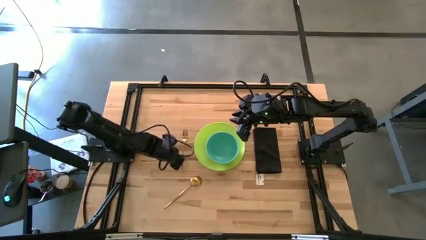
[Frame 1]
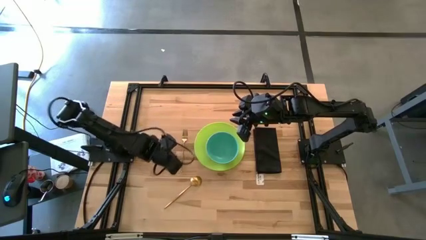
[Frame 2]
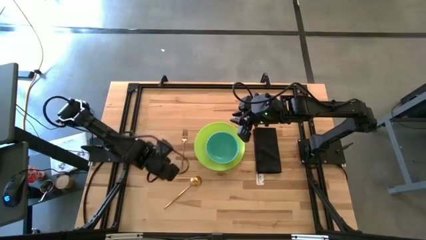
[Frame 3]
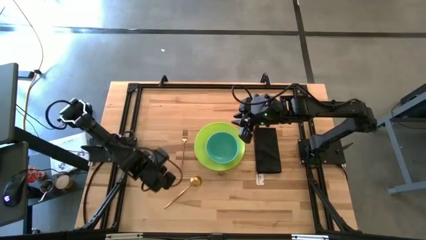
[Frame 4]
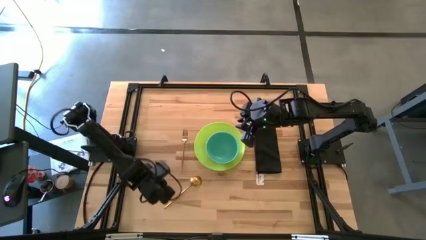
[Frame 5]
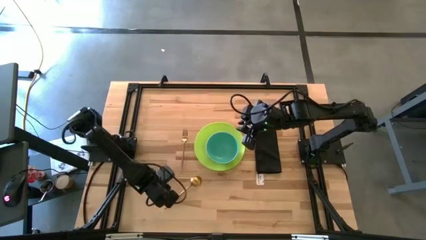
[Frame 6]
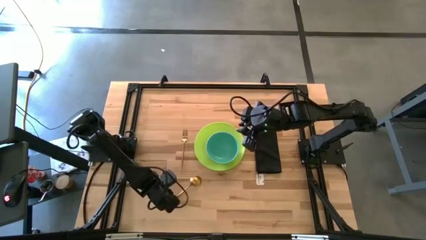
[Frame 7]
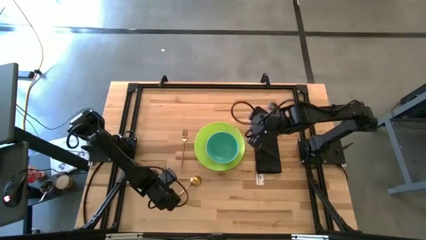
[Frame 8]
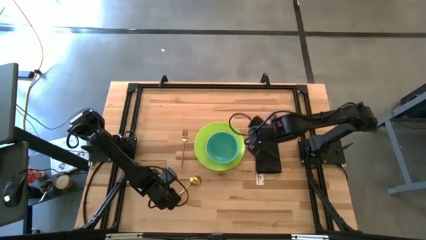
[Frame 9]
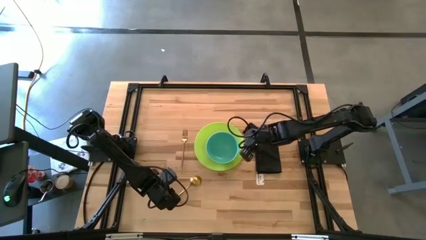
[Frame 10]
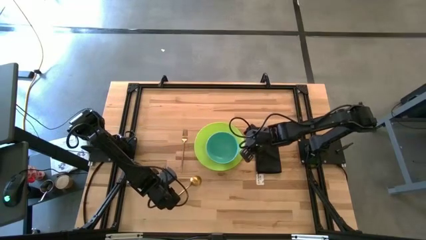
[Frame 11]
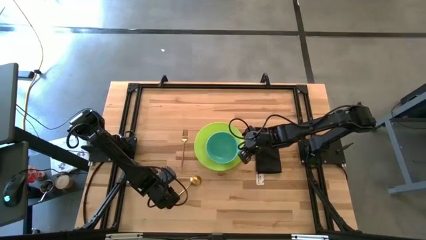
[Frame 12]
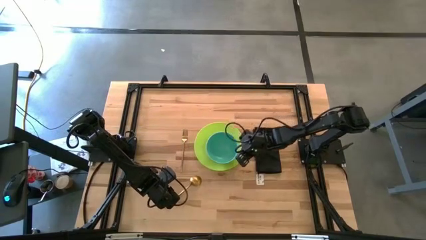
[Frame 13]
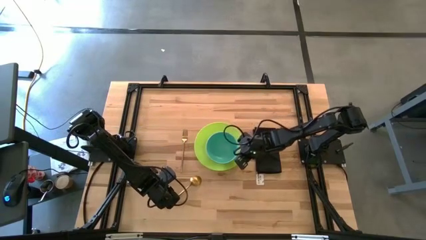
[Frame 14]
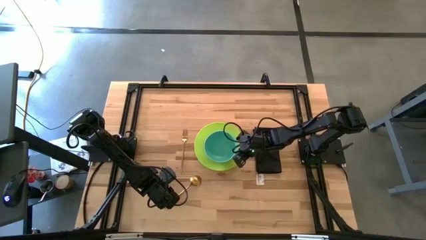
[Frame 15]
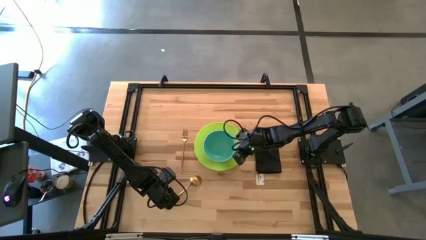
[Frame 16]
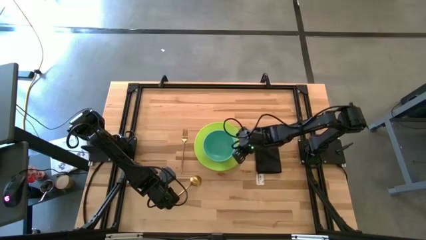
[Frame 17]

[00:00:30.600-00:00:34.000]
Task: Set table place
Adjust the blue bowl on the light green plate

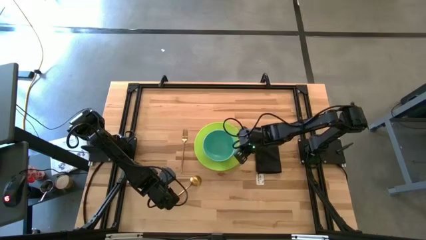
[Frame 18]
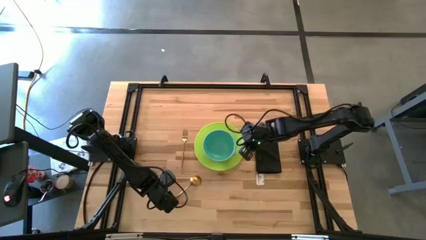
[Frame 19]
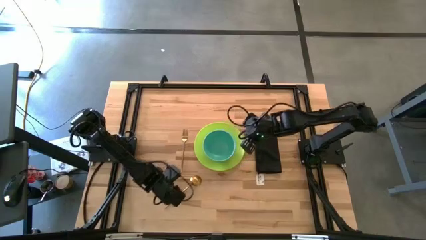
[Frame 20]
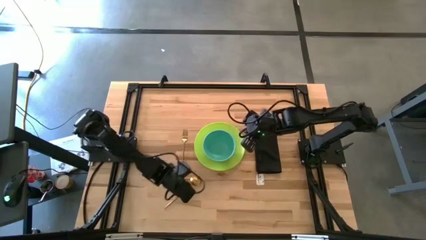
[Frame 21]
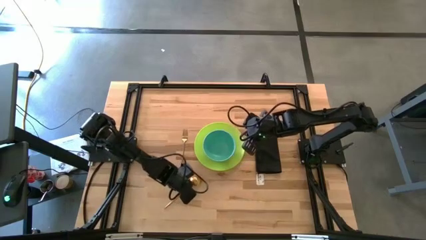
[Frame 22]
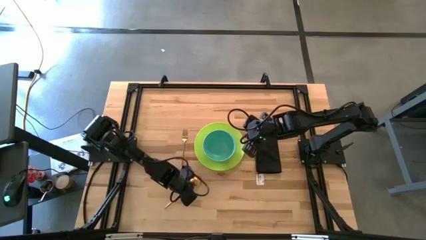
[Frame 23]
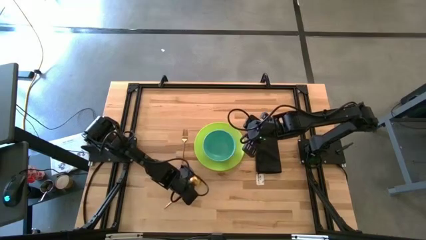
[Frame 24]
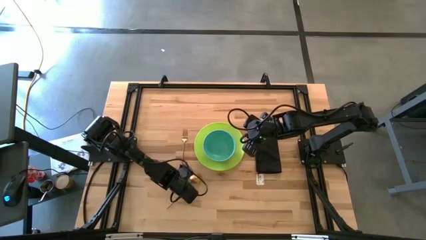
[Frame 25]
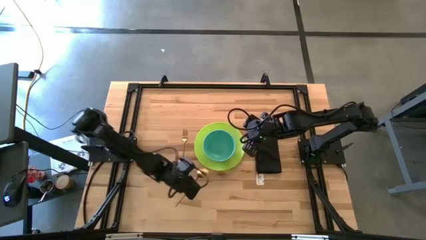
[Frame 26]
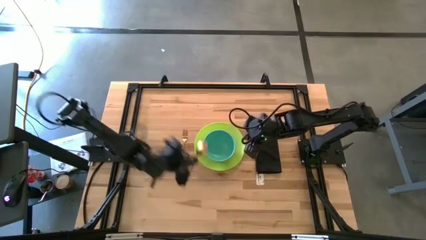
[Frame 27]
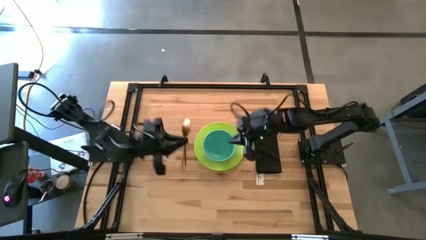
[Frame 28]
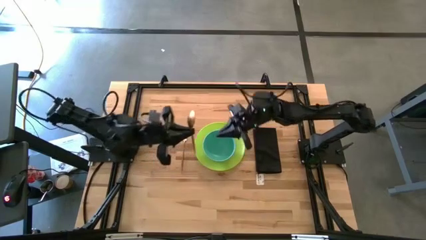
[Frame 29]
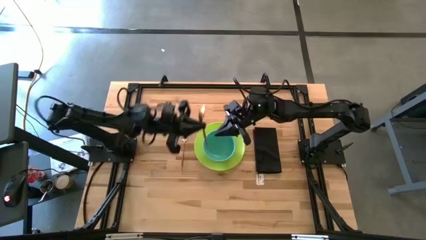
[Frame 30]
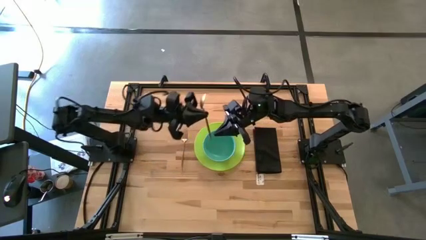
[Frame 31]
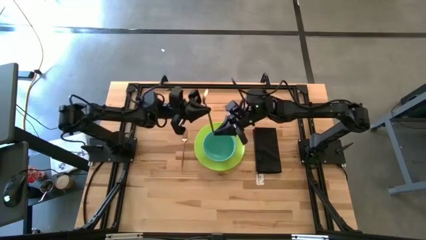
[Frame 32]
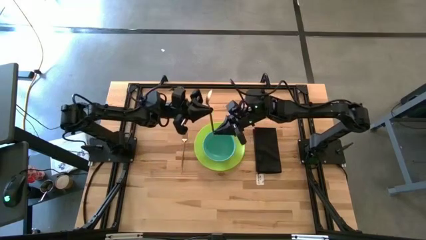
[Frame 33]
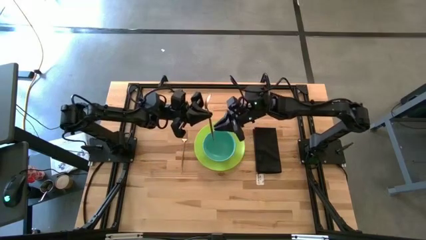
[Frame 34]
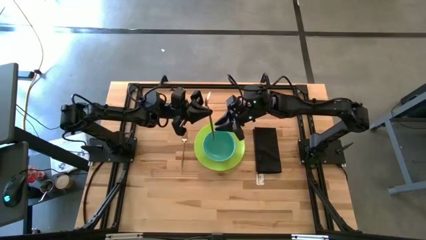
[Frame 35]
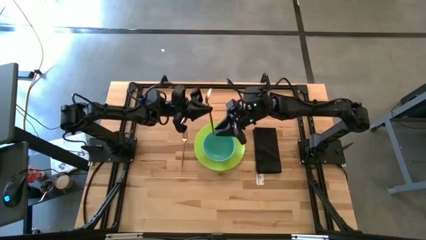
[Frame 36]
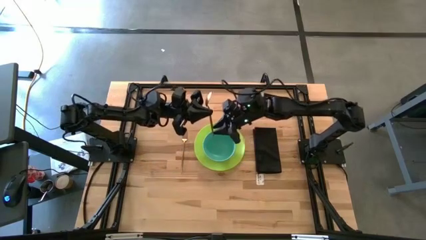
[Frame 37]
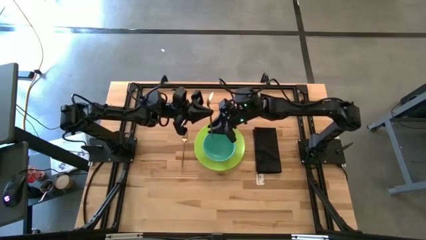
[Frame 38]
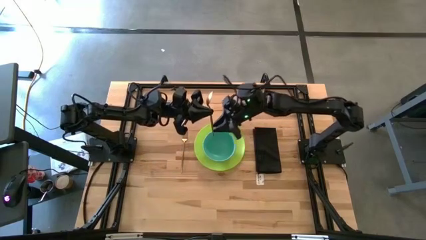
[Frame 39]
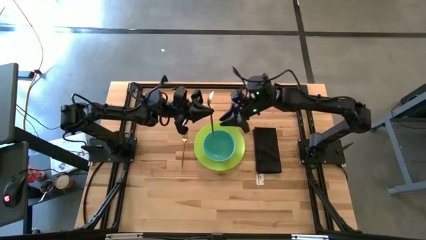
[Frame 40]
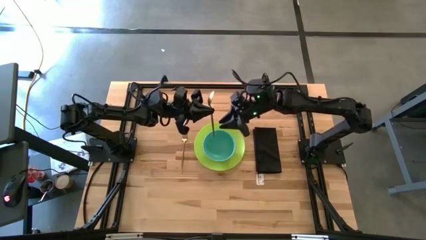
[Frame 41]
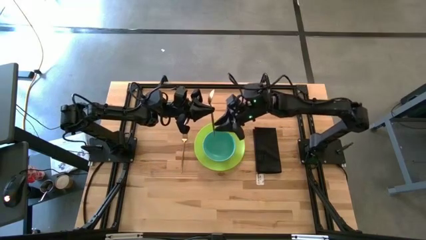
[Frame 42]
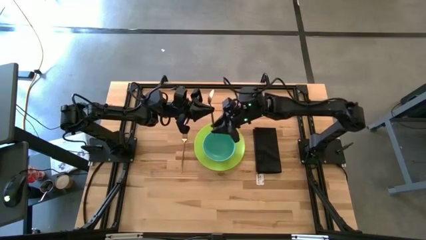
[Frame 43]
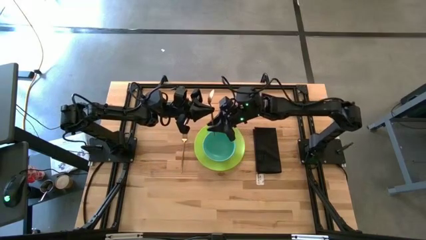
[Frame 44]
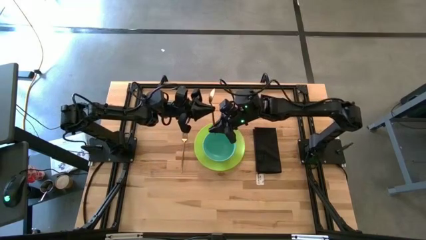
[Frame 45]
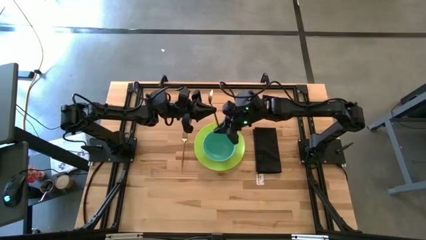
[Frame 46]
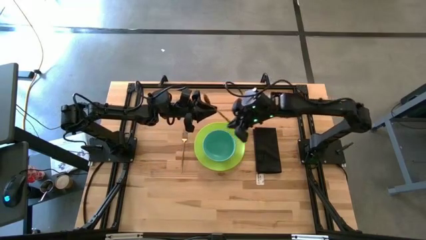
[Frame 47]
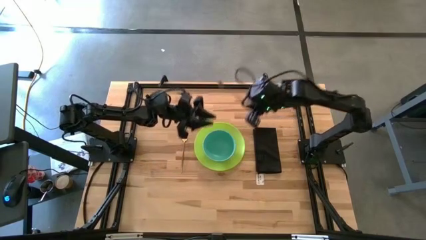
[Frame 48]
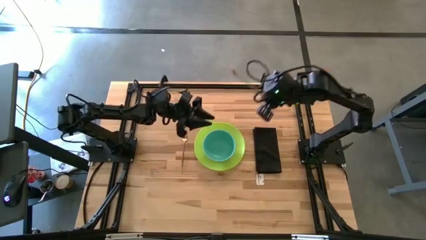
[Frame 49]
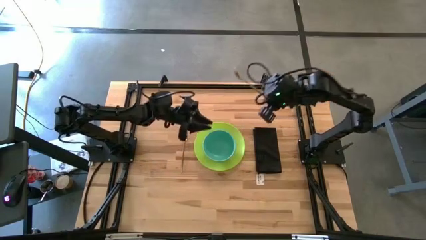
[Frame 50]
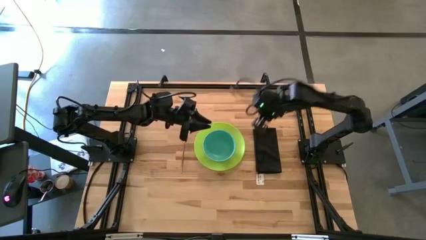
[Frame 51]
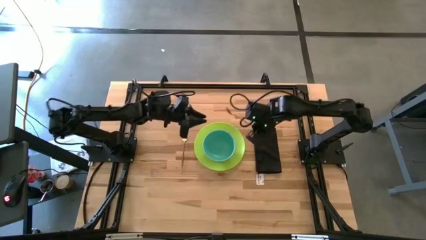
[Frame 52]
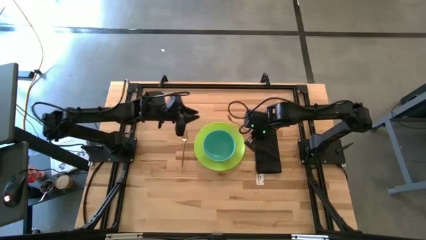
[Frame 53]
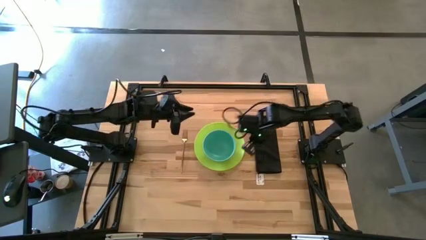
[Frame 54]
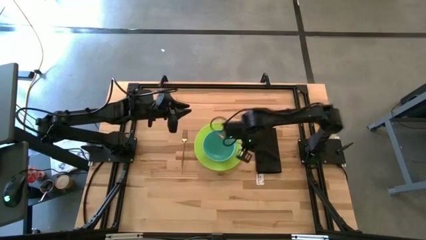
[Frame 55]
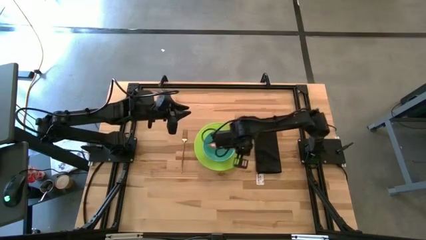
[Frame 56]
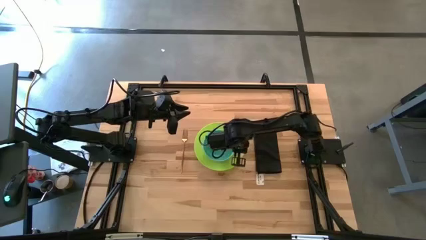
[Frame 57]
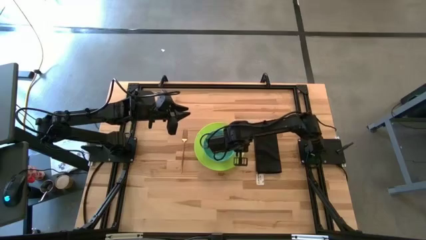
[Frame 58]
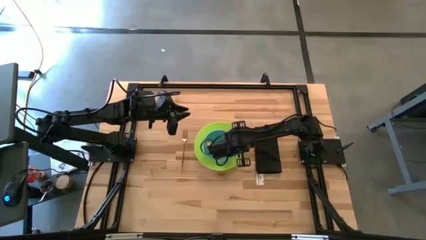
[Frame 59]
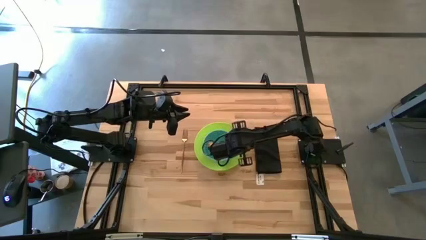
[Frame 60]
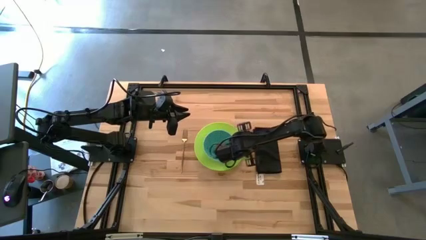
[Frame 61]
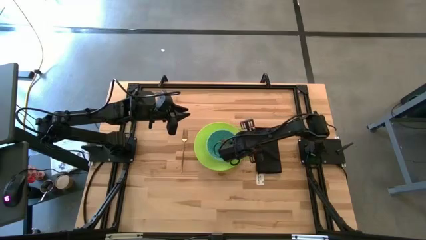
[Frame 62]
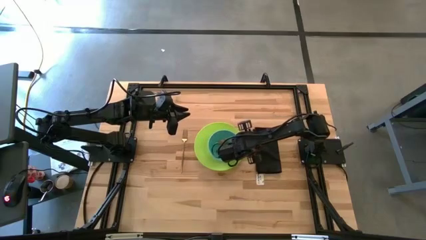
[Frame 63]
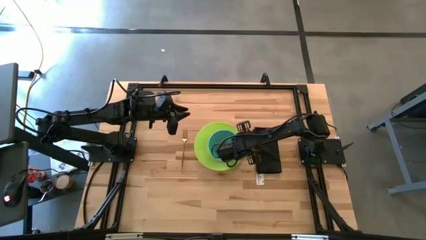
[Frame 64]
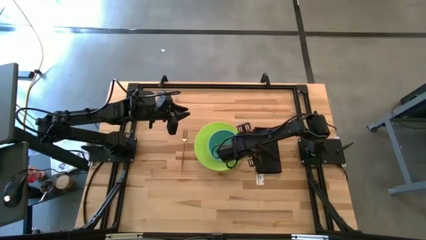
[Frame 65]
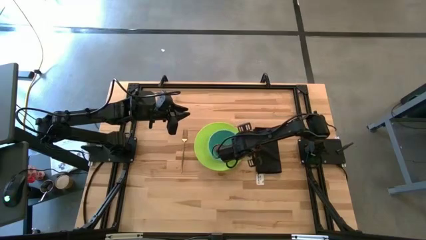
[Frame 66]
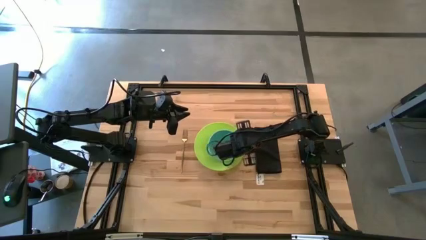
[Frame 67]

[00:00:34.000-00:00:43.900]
Put the gold spoon into the blue bowl

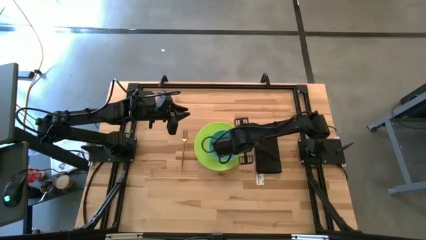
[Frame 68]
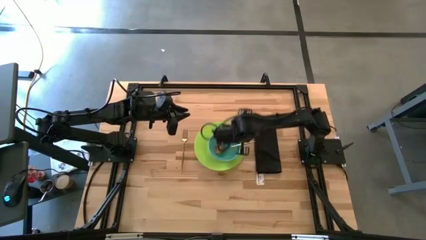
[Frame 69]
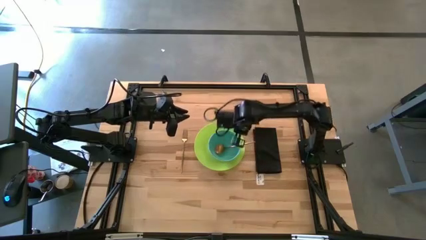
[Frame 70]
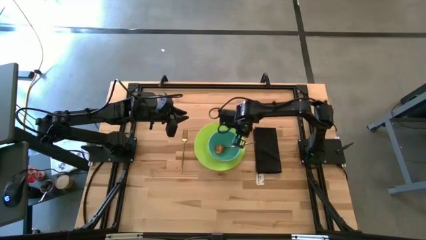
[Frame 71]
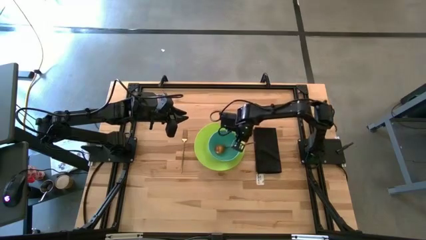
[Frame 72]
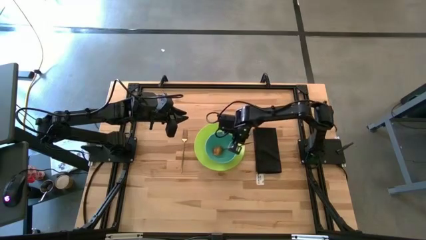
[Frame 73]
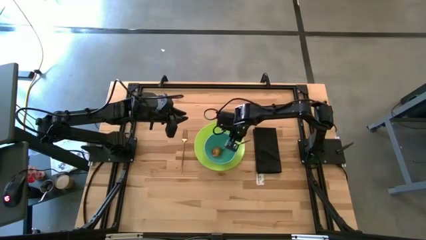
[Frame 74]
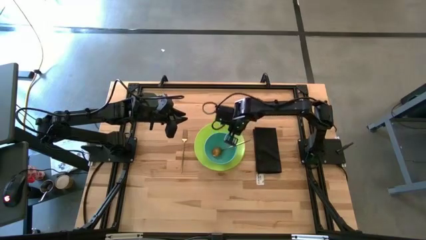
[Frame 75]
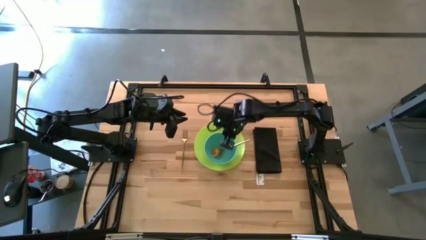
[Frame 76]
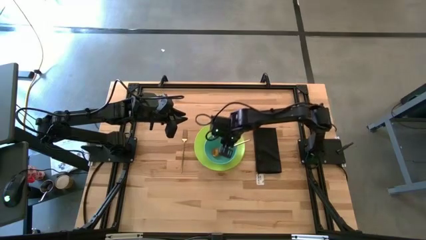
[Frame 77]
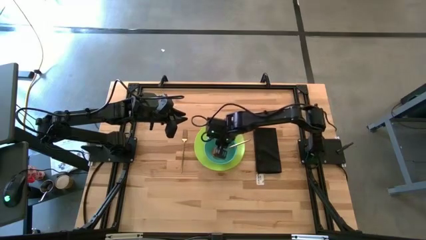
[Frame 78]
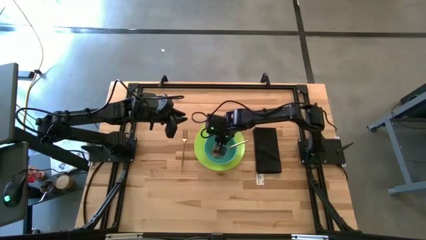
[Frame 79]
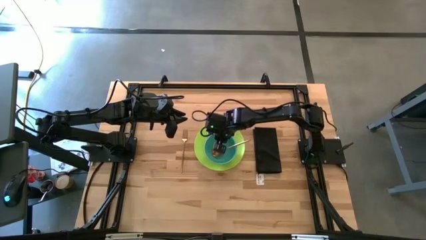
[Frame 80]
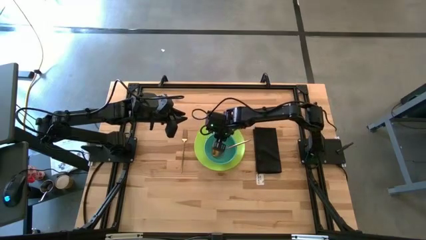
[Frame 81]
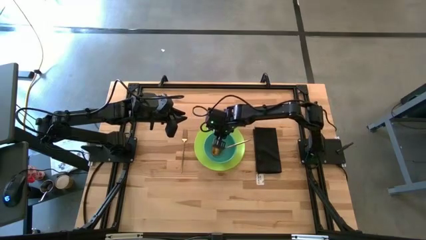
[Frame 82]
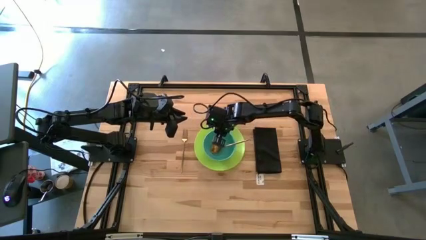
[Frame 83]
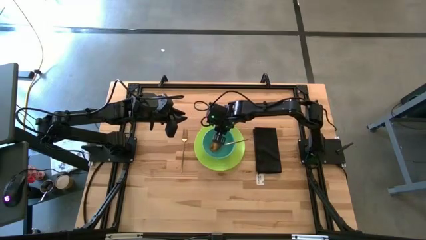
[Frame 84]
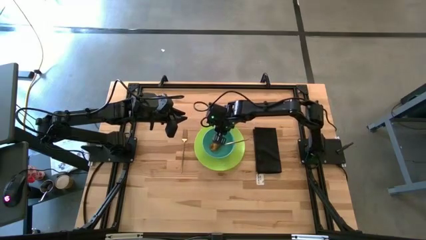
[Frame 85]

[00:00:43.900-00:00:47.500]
Adjust the blue bowl on the light green plate
